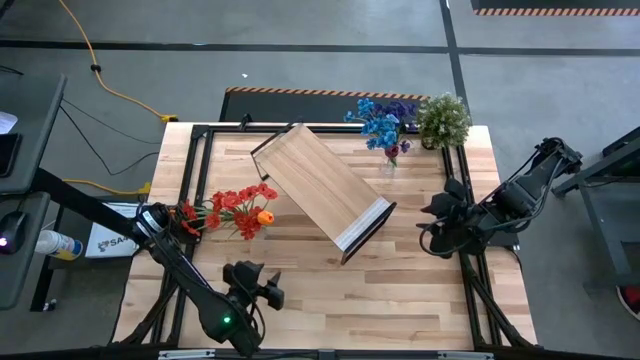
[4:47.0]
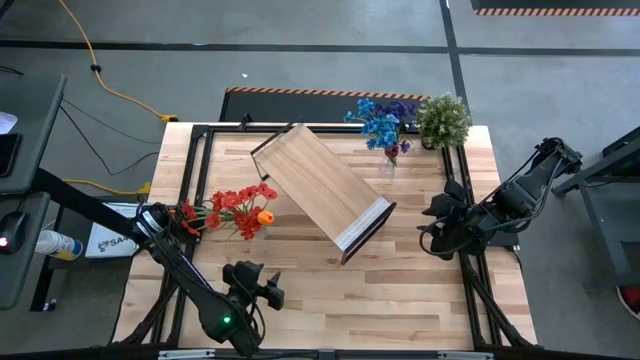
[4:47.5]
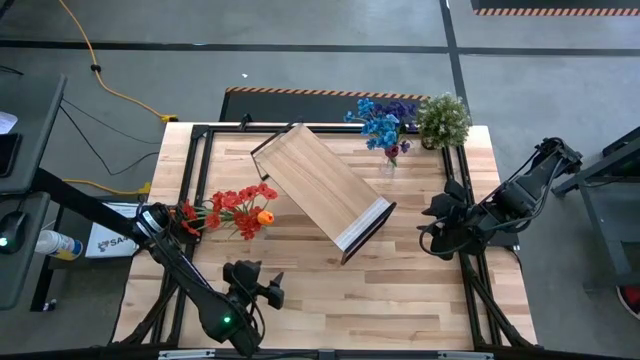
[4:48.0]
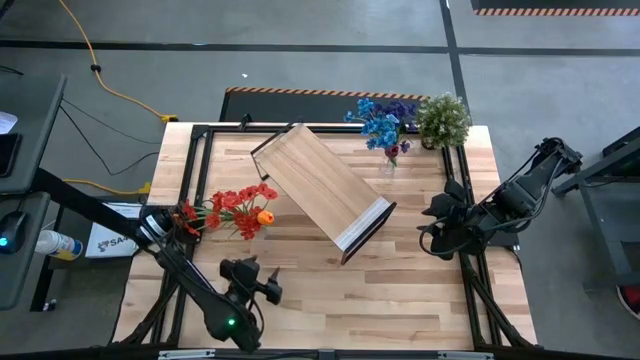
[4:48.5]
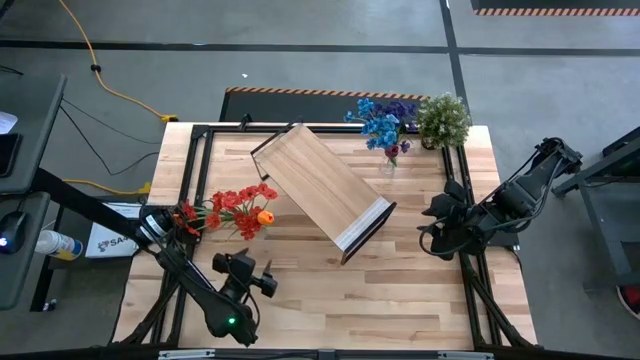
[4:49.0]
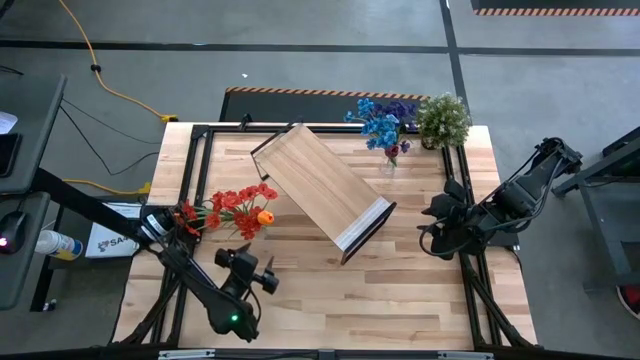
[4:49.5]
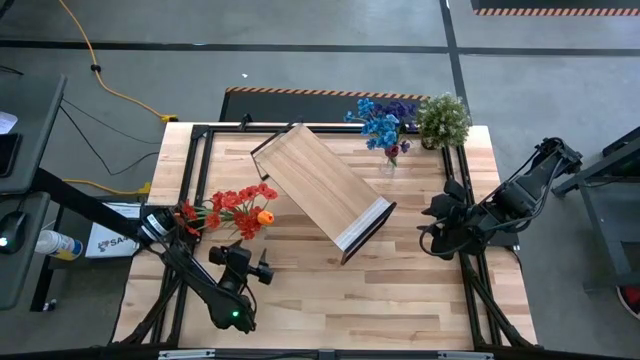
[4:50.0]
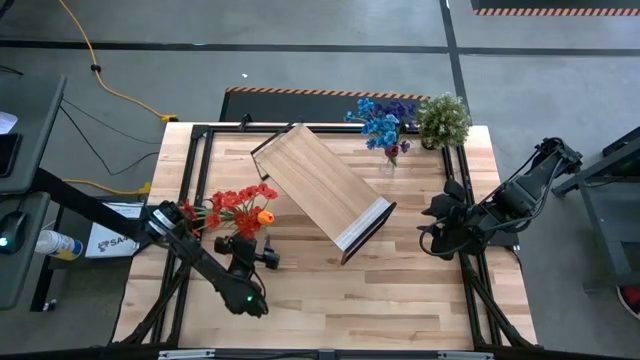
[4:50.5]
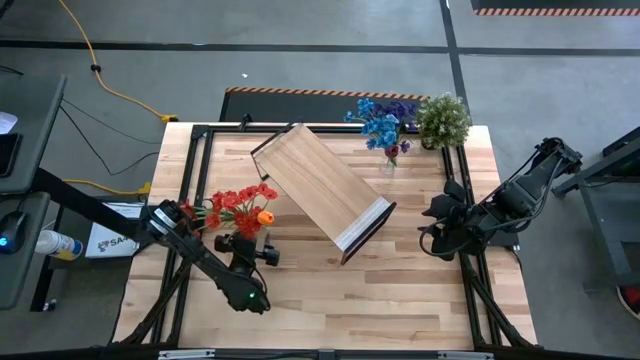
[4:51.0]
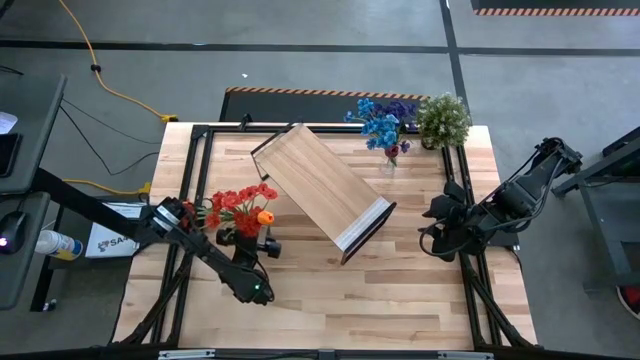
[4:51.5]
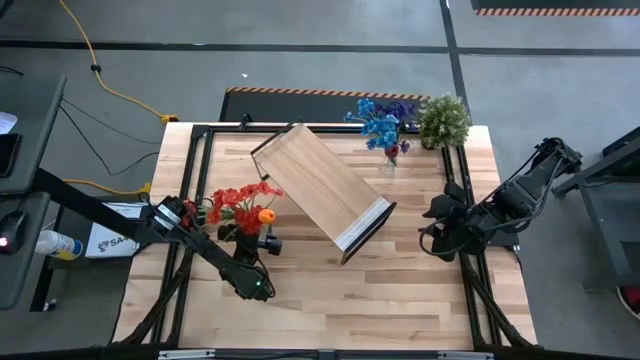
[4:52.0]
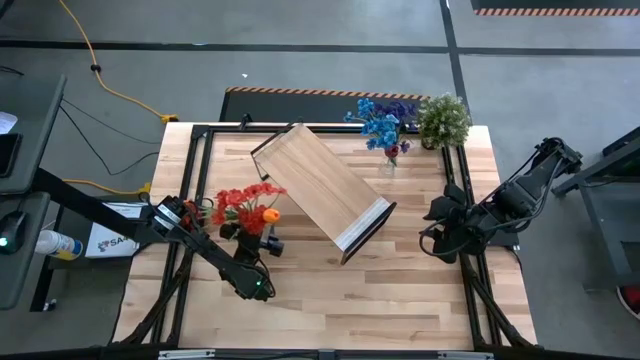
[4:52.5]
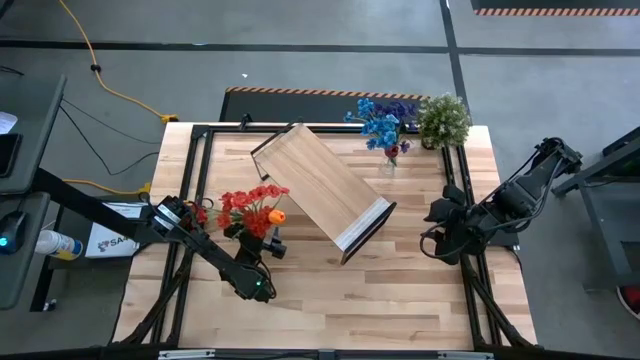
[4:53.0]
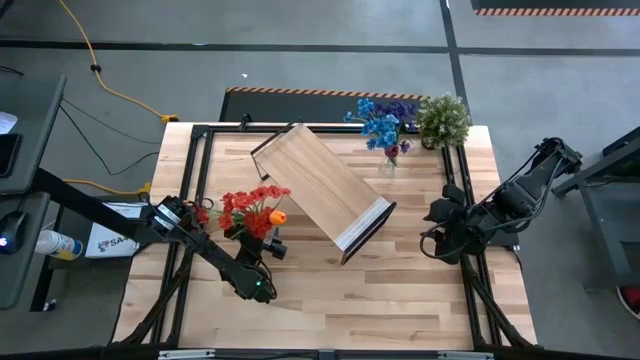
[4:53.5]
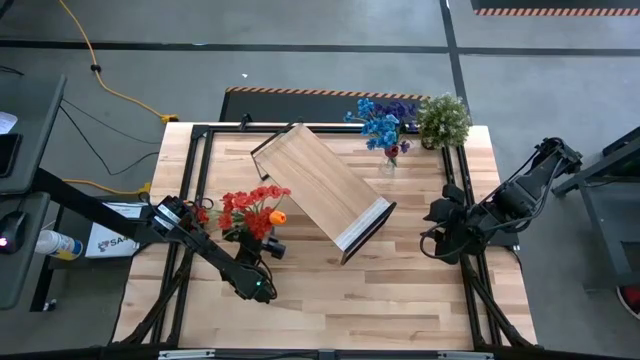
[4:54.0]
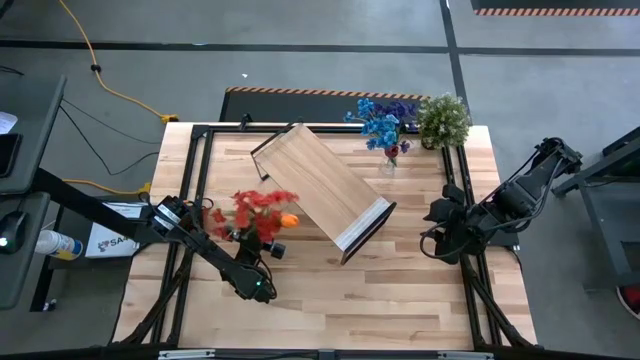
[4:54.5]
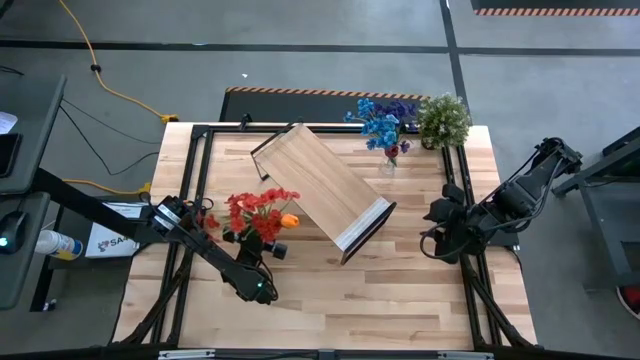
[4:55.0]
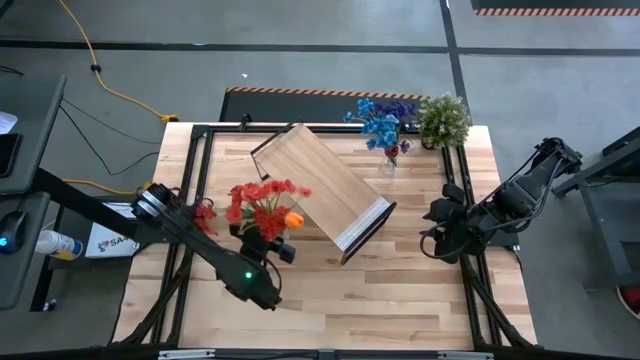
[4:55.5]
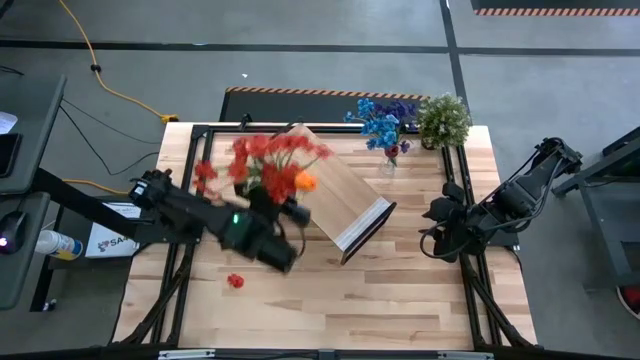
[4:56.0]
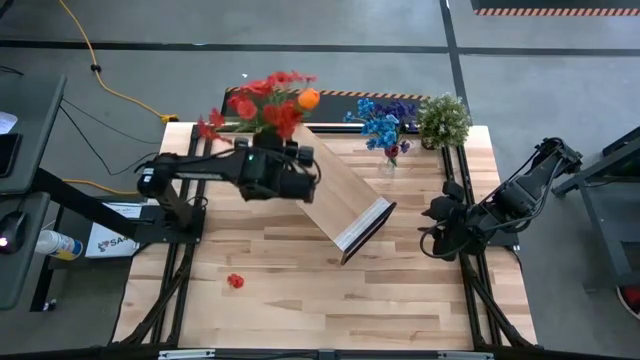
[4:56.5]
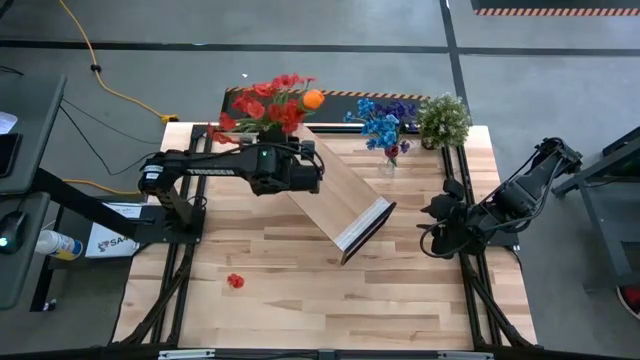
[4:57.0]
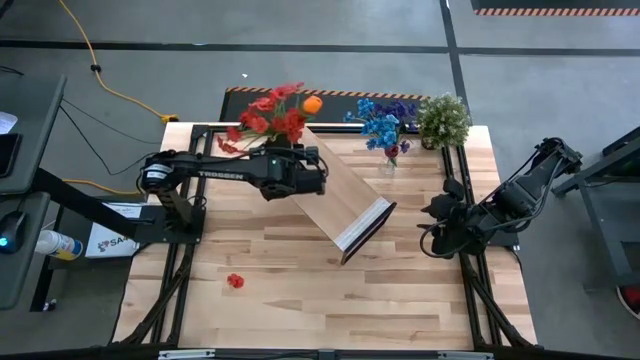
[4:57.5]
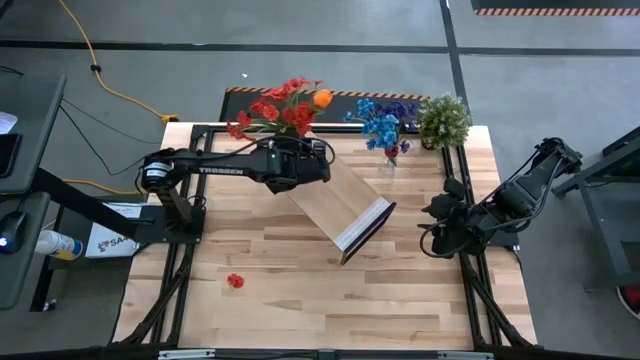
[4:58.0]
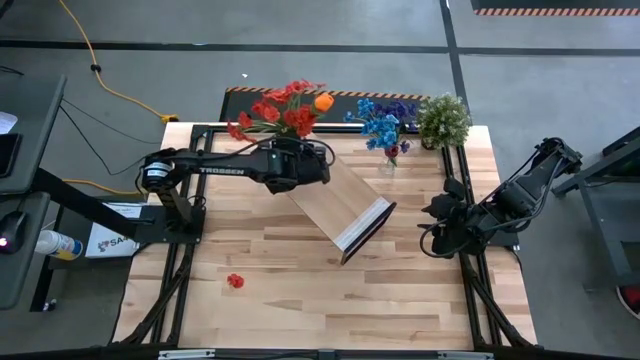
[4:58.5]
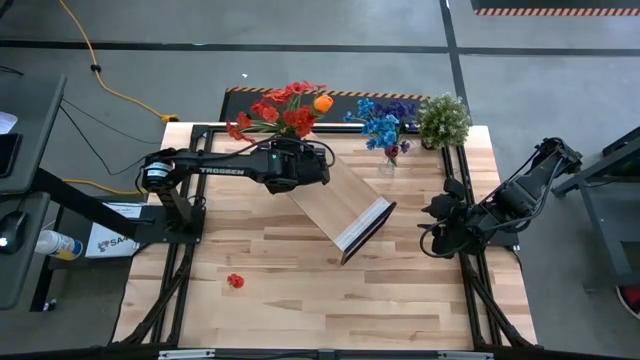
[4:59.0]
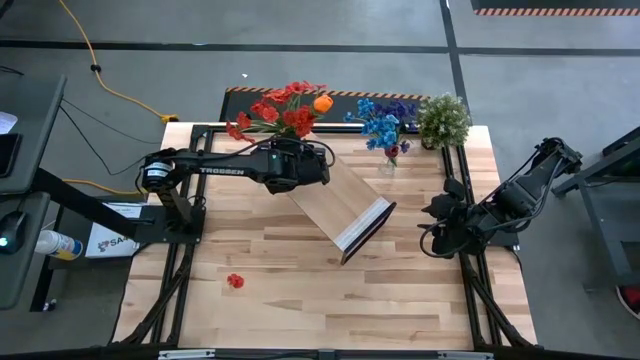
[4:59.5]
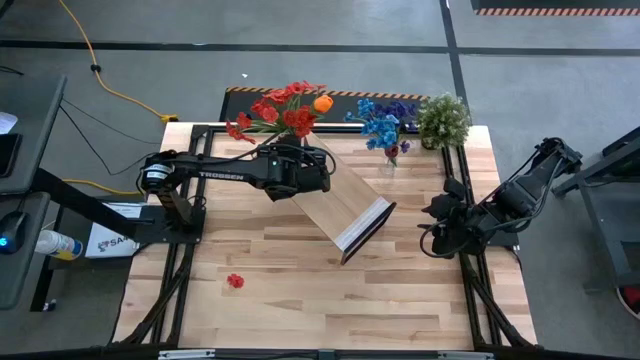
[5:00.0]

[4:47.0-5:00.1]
Task: Pick and place flowers into a vace then onto a shelf
Put the bottom transparent vase on the shelf

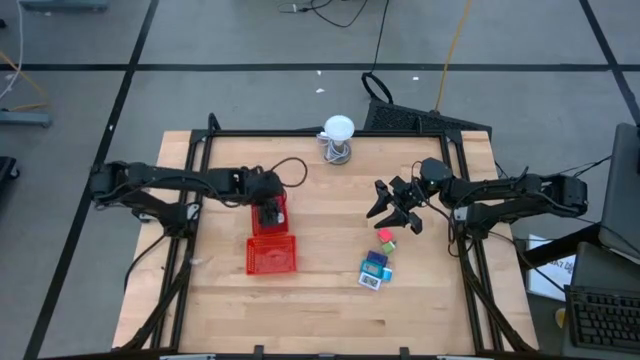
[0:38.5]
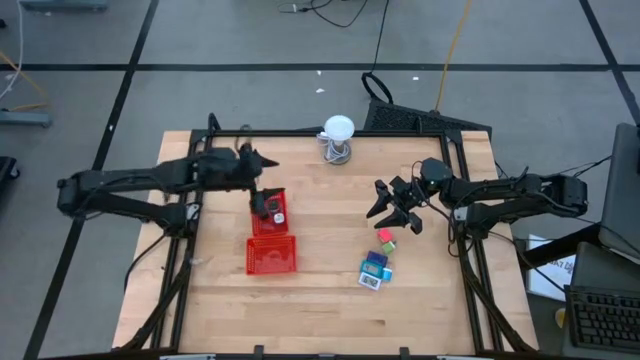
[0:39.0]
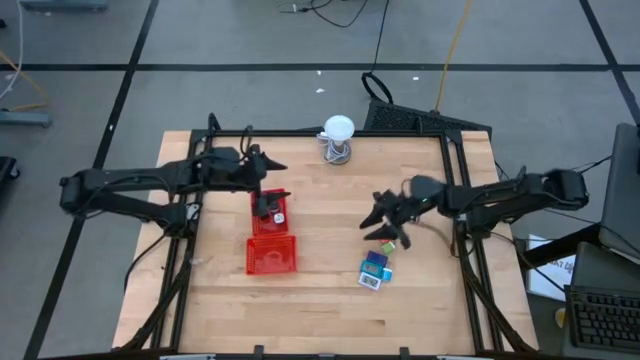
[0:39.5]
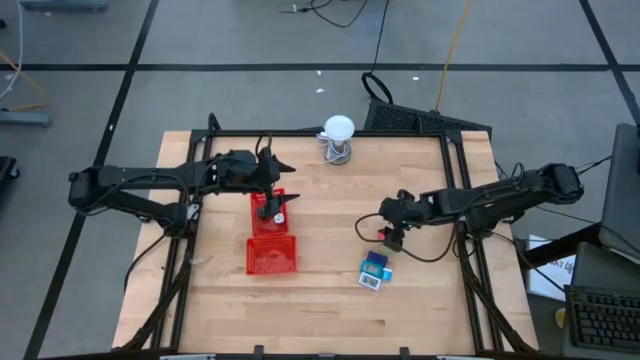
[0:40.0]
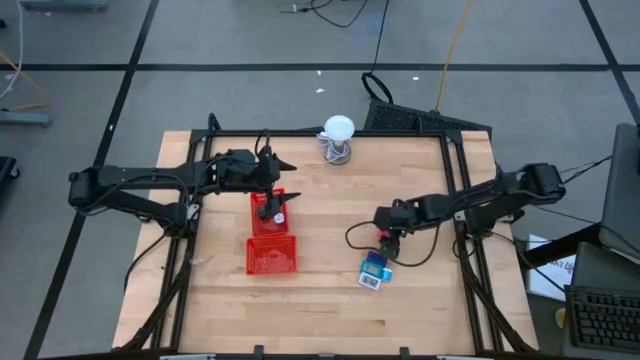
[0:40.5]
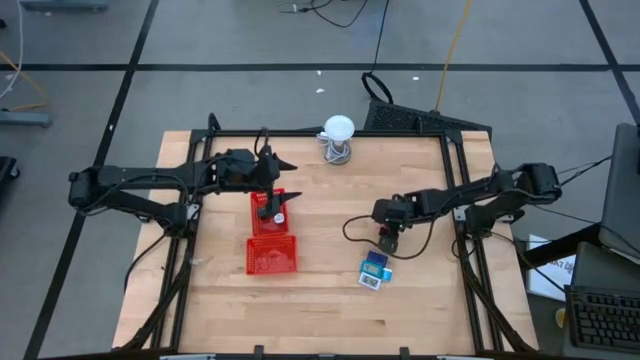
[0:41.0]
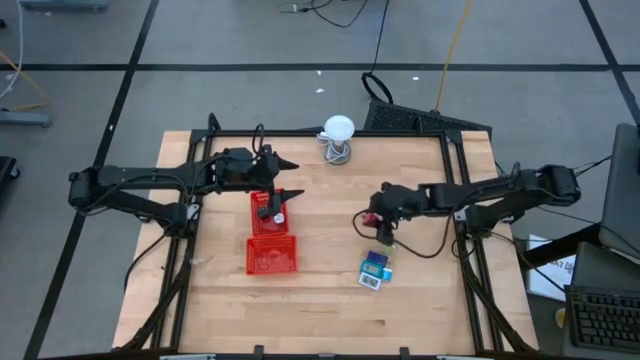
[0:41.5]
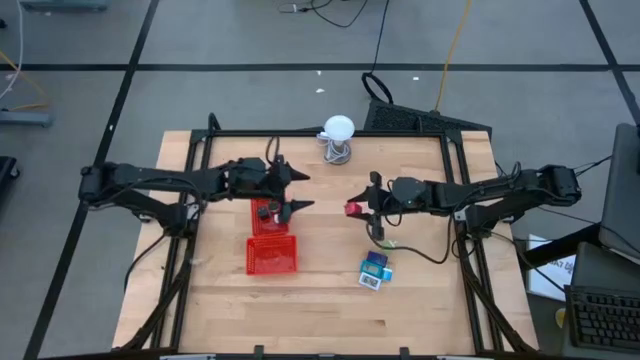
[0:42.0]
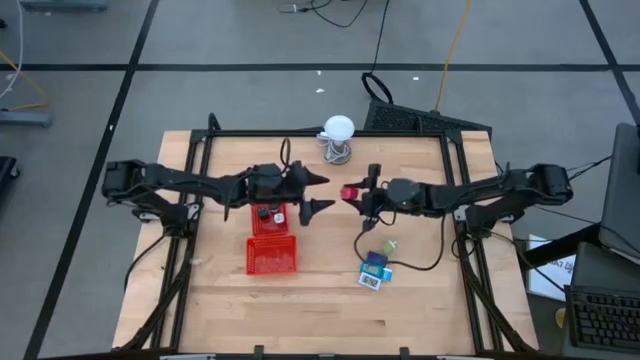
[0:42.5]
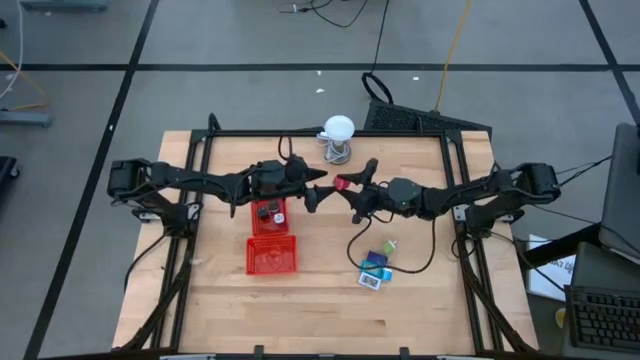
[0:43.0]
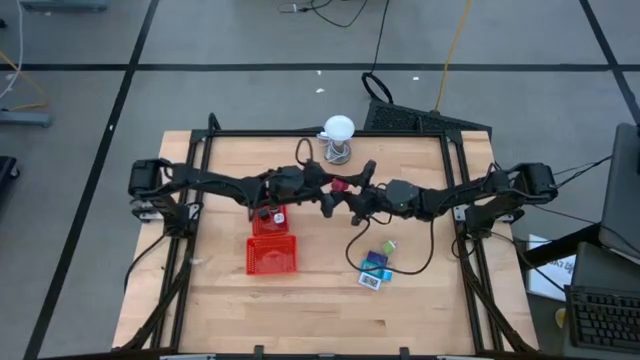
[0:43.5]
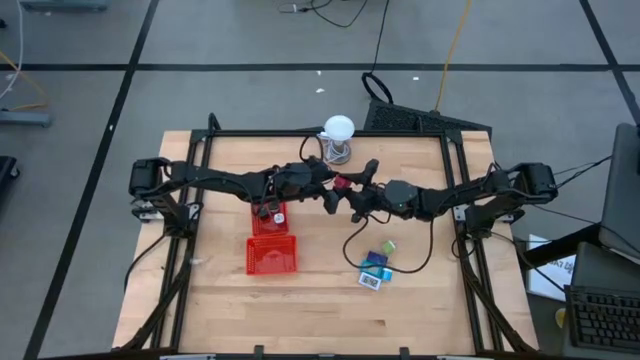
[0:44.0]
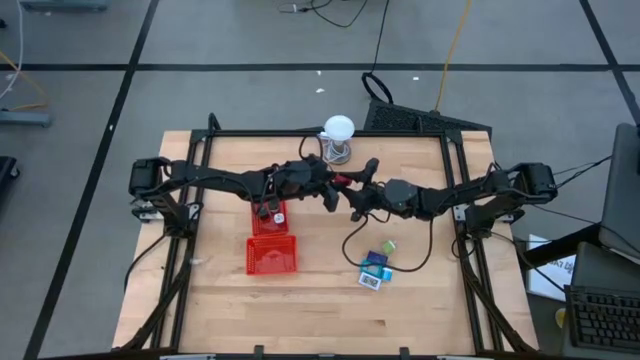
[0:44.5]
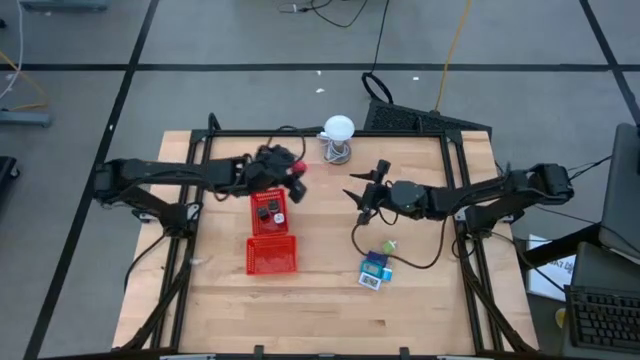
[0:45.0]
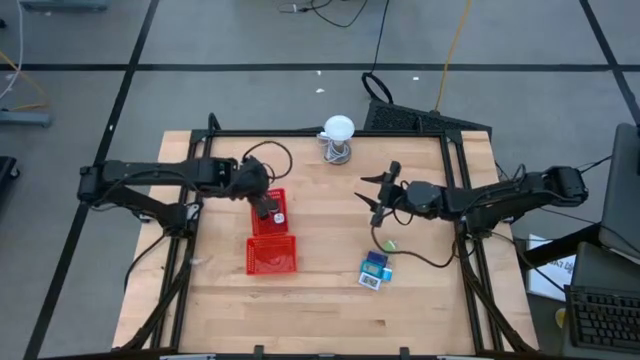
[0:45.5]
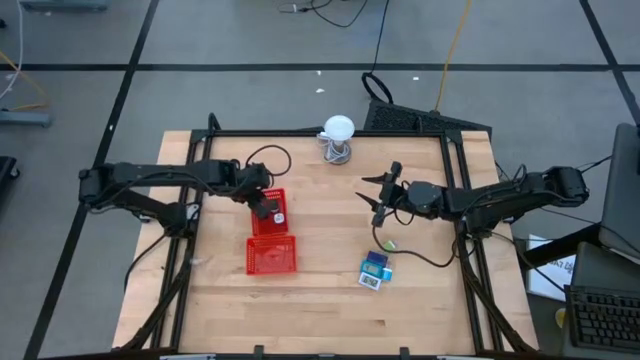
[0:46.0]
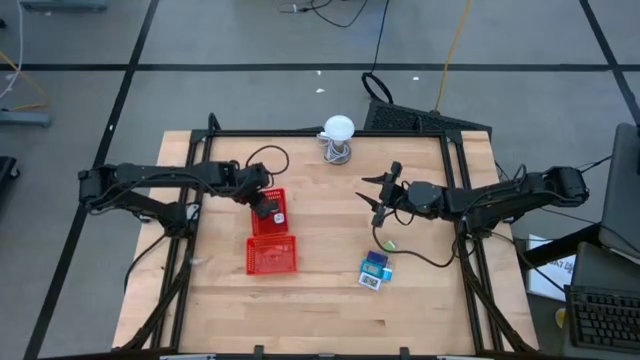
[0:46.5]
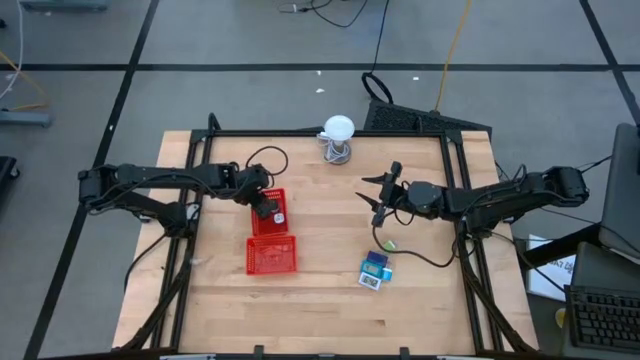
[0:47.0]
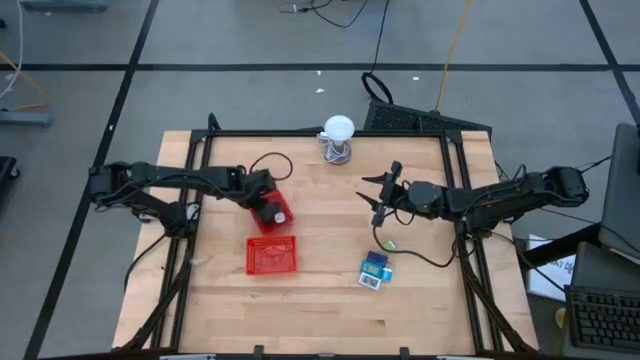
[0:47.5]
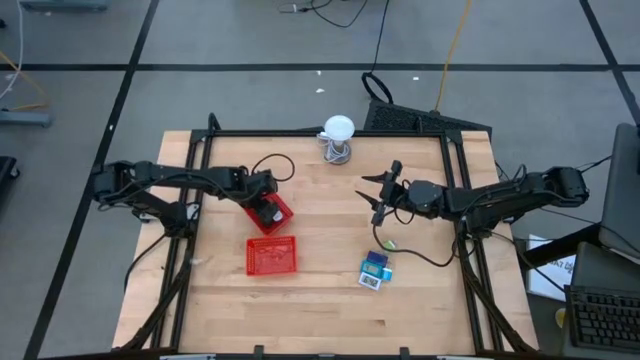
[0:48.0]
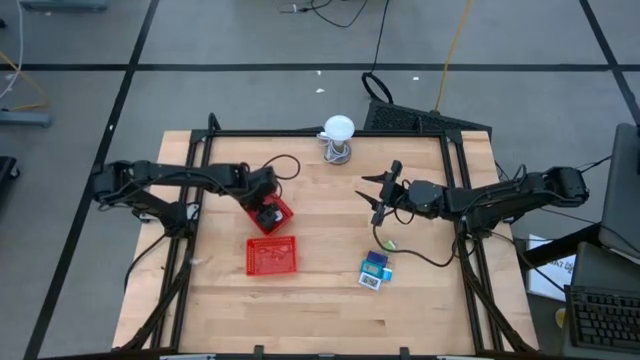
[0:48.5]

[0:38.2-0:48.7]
Task: Pick & Place Office items
Put the pink charger adapter into the top red basket
